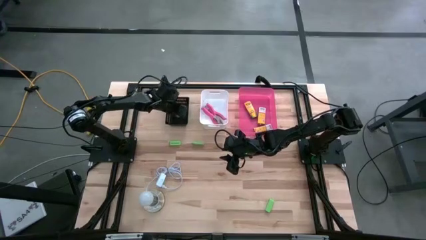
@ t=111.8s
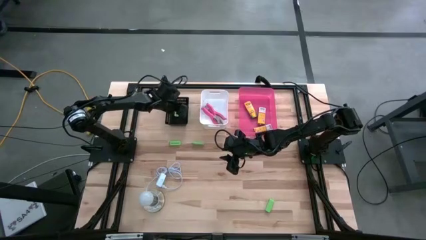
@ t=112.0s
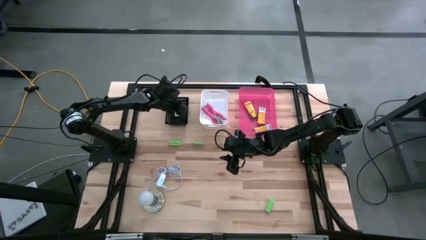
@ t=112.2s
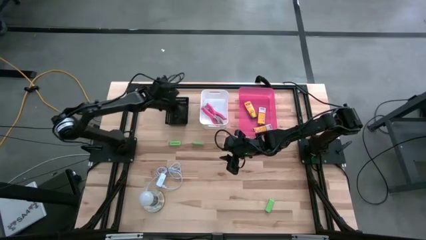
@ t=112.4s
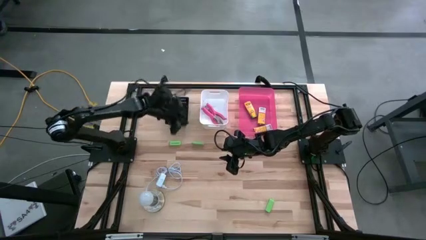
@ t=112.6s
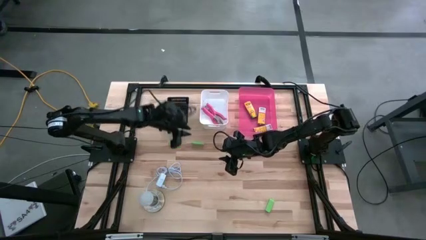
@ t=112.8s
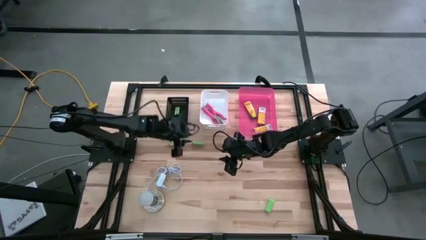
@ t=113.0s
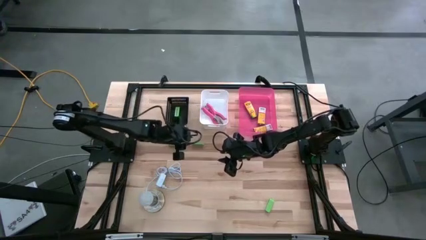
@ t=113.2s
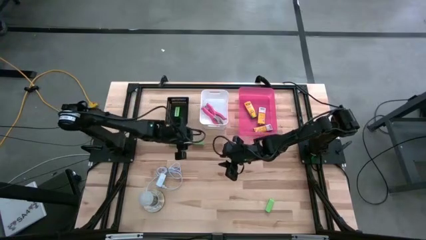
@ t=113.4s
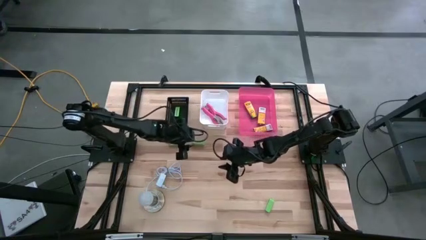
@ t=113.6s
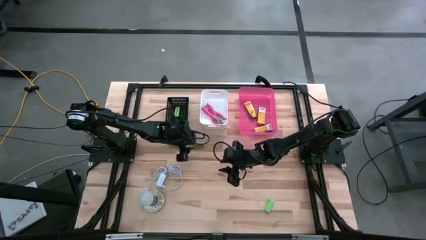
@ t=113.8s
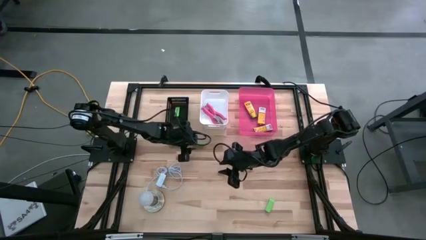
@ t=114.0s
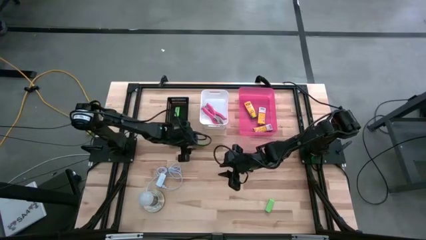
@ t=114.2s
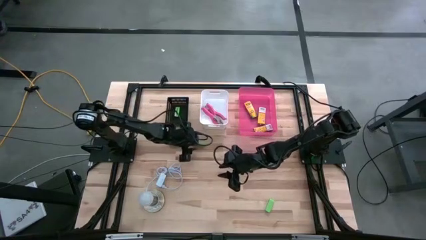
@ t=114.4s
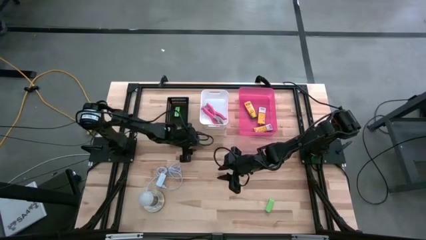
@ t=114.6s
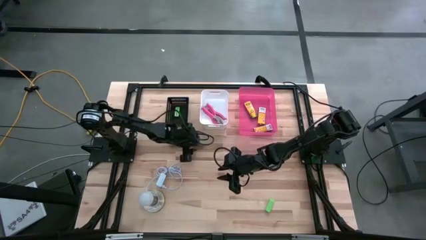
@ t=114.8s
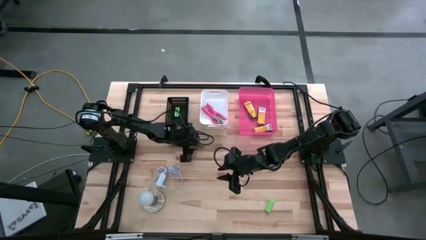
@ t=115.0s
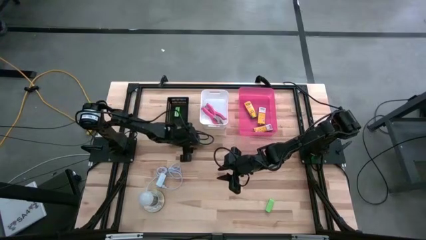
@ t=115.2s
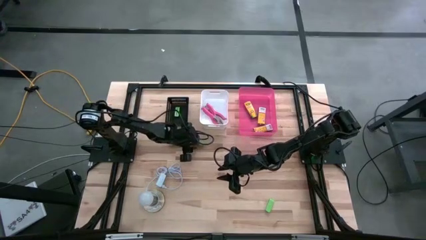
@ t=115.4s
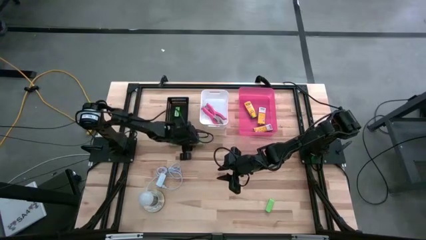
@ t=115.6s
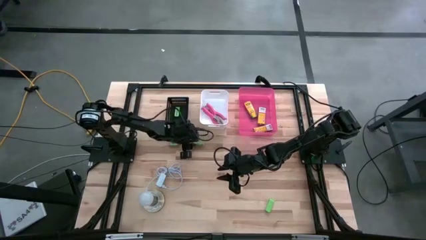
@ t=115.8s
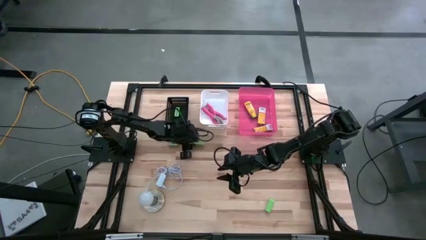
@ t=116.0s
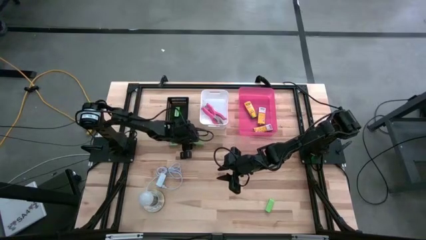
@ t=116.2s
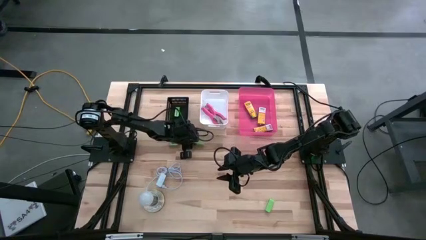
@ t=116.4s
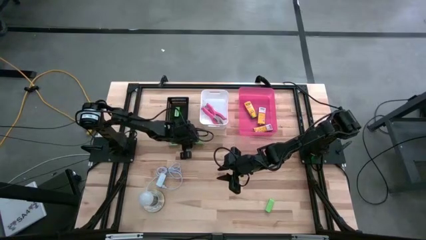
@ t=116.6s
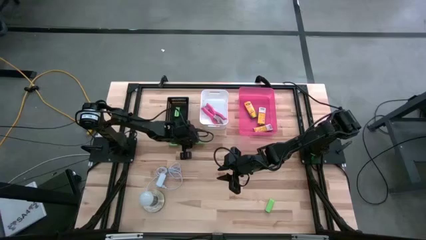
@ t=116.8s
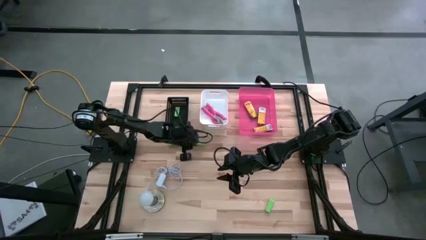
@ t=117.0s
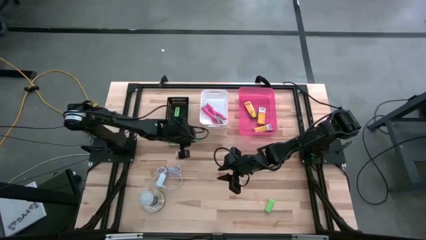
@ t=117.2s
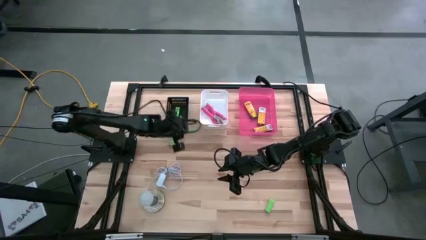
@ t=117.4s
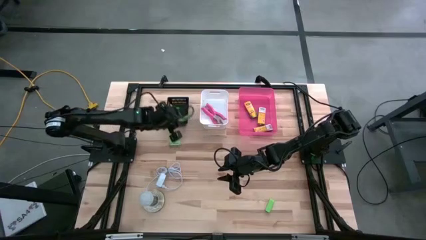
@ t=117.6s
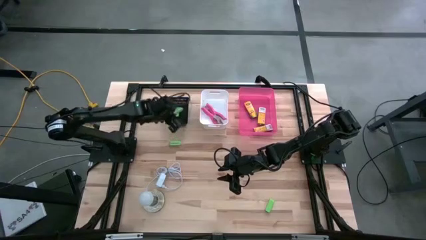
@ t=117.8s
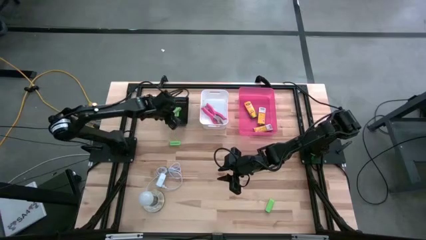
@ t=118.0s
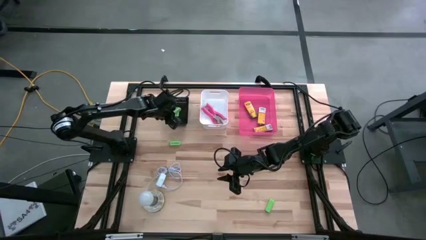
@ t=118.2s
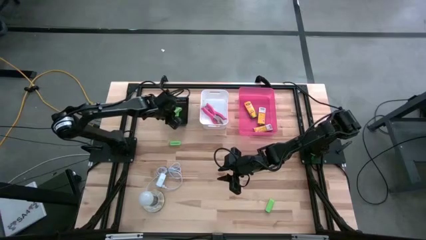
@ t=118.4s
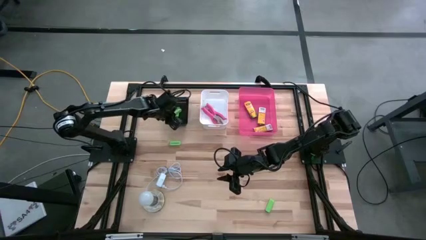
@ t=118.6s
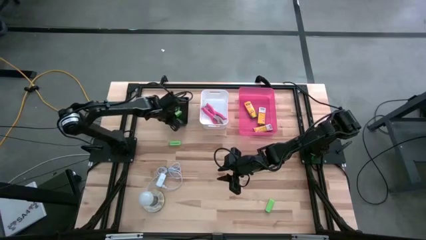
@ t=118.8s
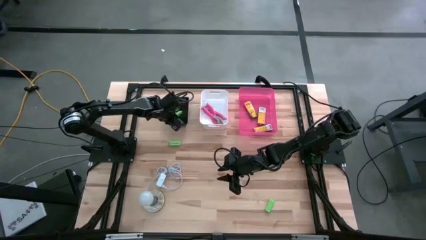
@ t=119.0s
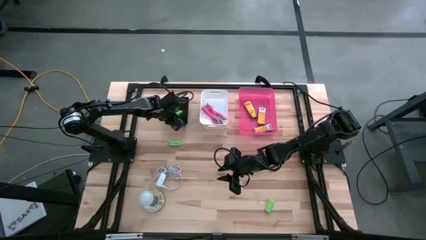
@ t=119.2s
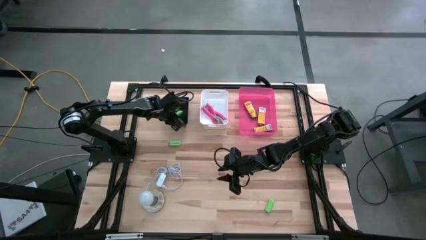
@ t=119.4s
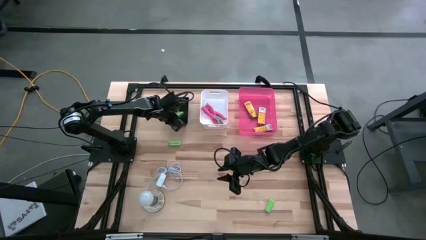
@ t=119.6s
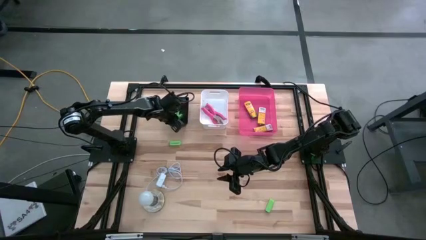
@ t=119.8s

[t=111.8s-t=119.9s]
Task: Pick & Place School Supplies
Put the eraser into the black bin

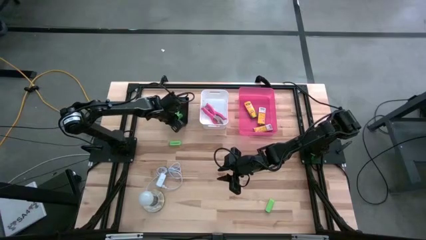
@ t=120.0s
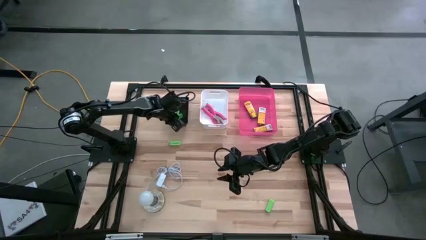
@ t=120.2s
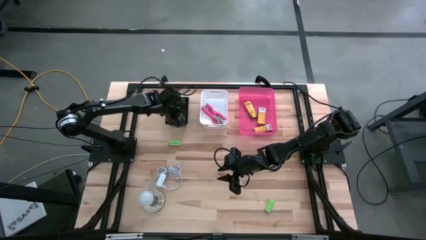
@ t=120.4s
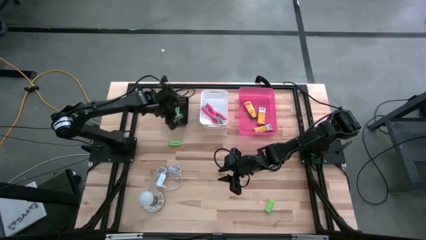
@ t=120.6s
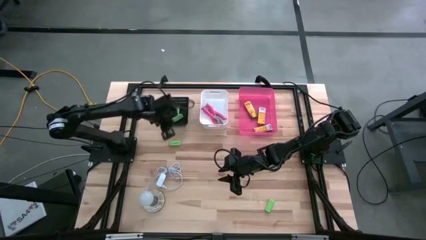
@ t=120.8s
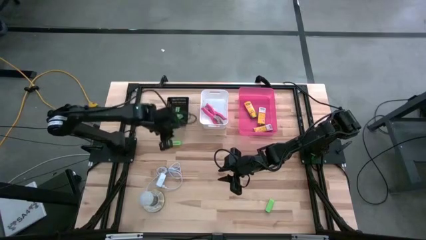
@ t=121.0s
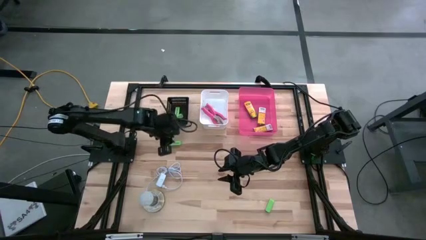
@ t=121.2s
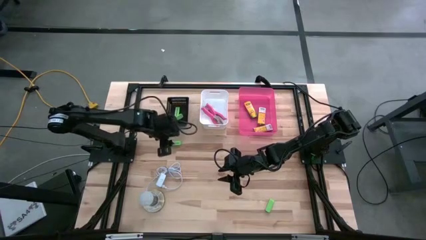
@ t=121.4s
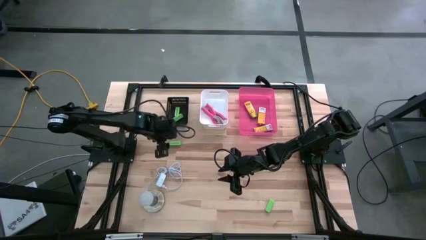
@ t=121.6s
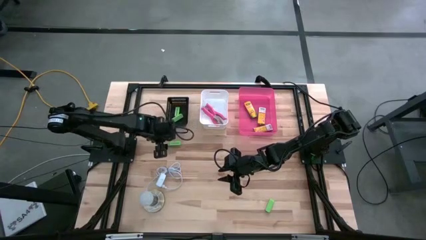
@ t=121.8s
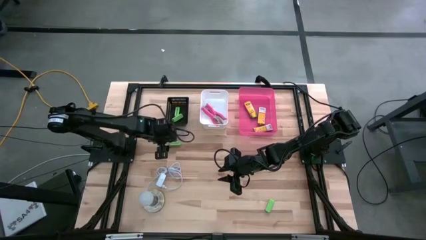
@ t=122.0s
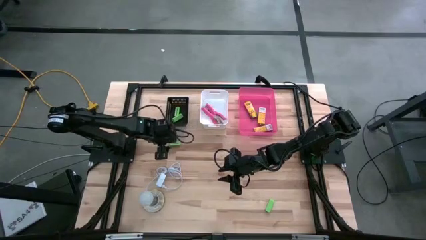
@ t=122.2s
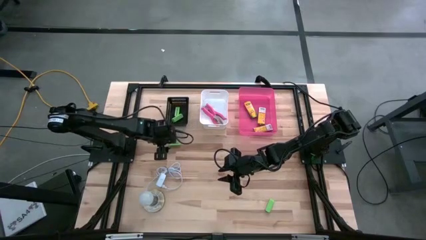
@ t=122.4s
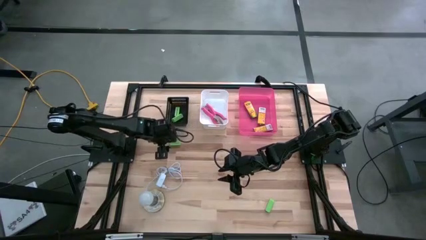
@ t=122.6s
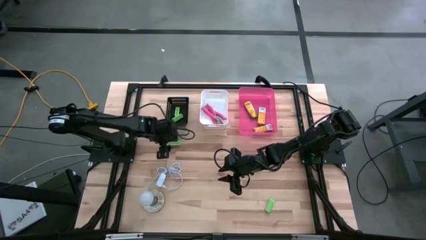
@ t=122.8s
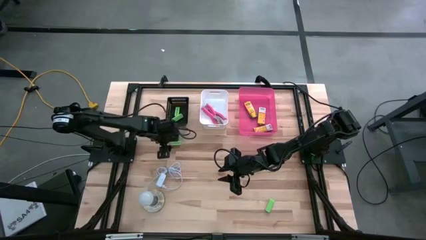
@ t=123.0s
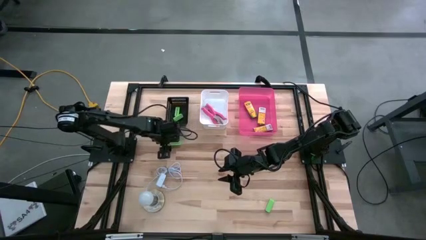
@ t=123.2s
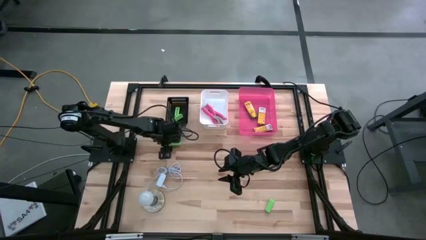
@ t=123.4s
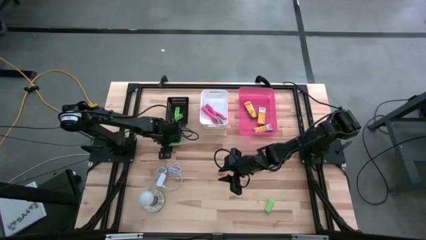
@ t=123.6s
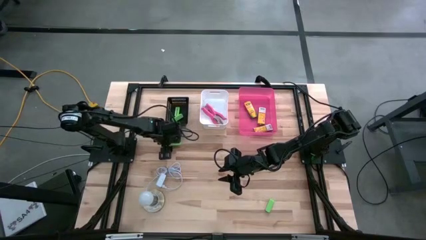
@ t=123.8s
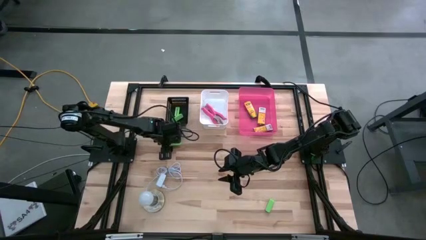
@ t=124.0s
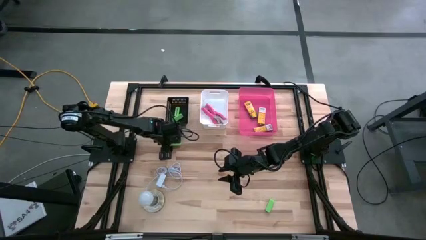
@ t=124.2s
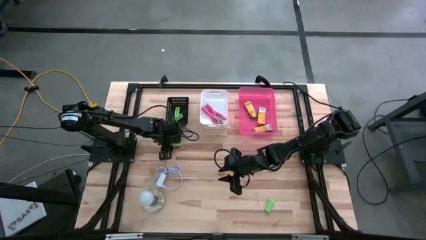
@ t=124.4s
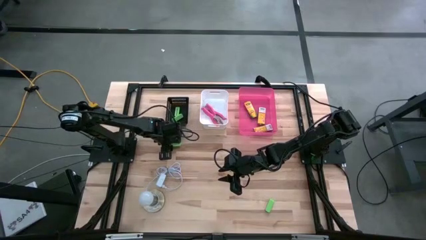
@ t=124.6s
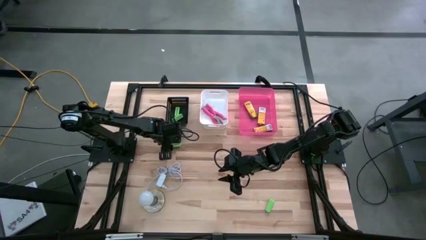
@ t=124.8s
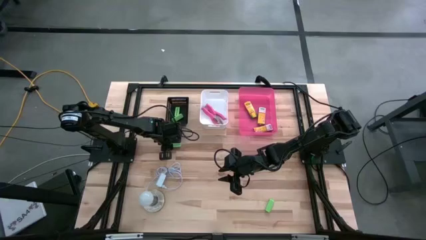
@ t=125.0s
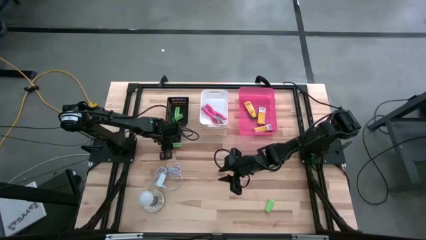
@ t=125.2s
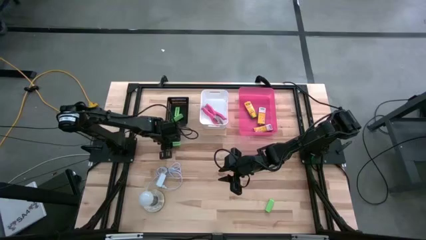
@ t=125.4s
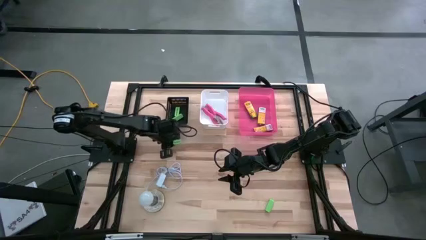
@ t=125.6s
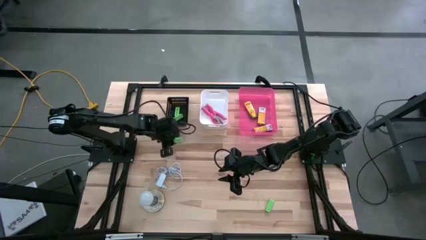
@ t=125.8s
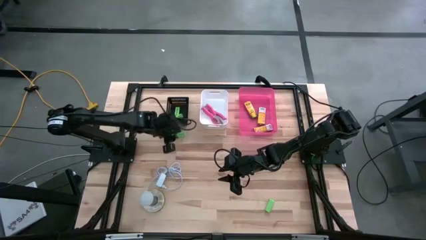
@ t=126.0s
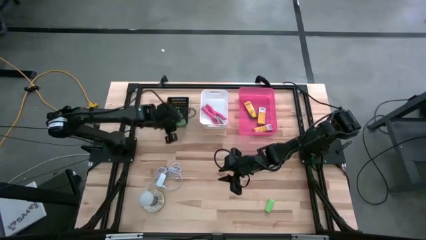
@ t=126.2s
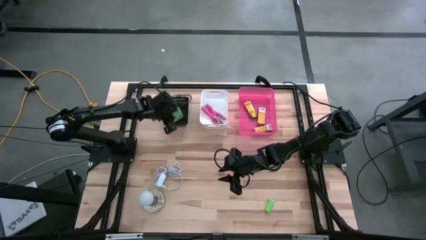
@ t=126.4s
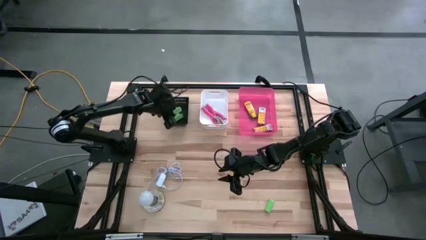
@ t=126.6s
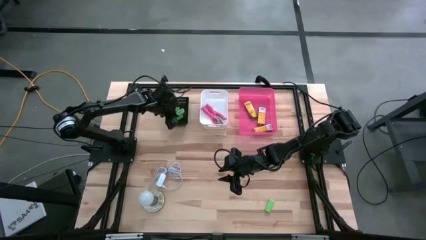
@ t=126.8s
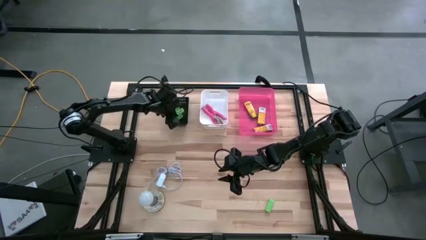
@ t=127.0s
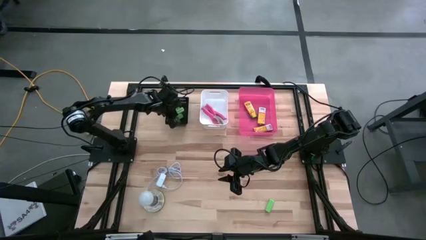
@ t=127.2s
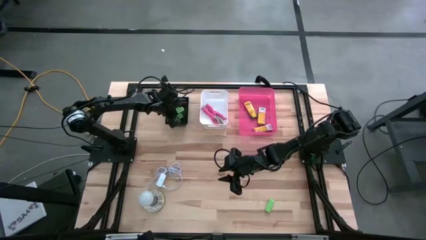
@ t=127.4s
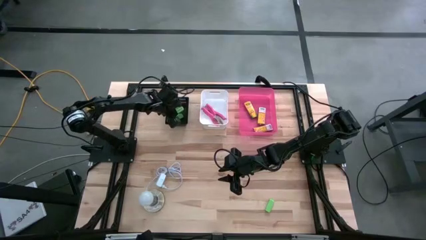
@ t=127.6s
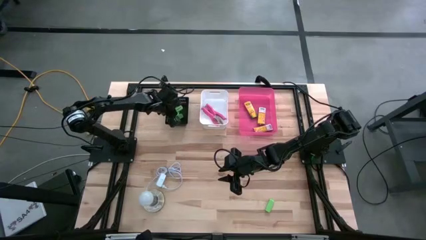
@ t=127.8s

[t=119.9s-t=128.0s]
Put the eraser into the black bin
